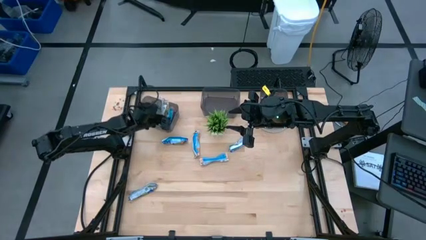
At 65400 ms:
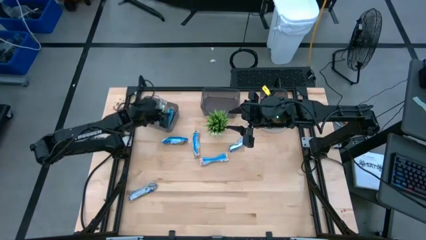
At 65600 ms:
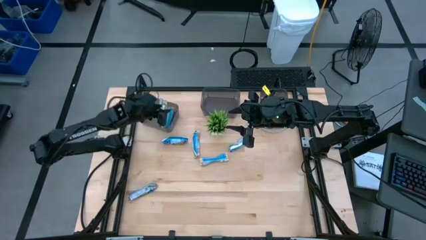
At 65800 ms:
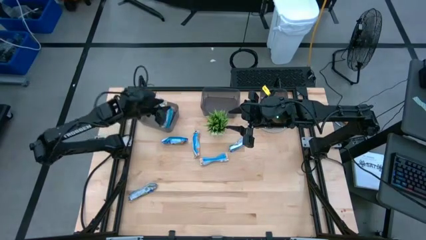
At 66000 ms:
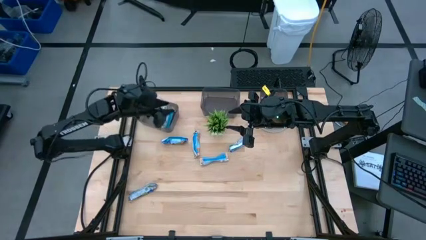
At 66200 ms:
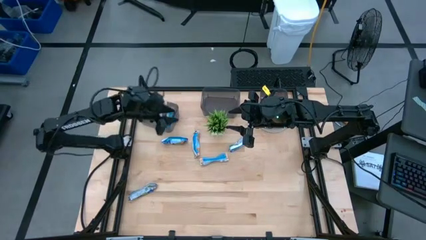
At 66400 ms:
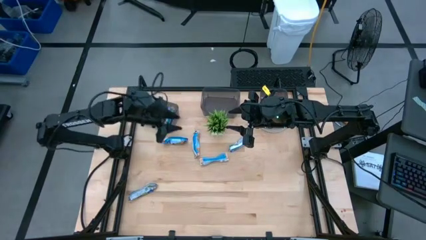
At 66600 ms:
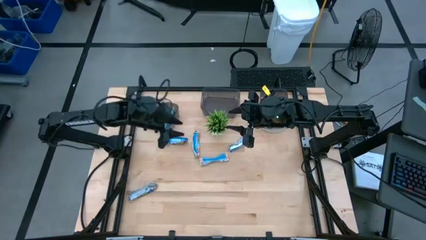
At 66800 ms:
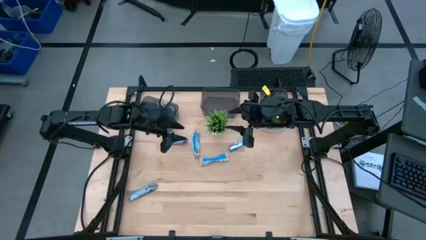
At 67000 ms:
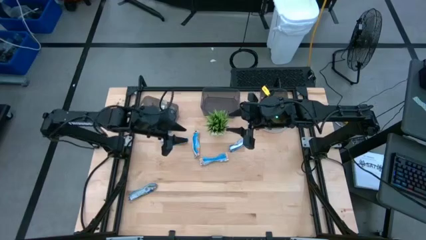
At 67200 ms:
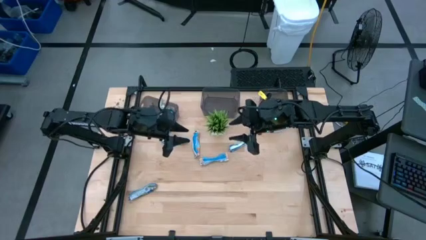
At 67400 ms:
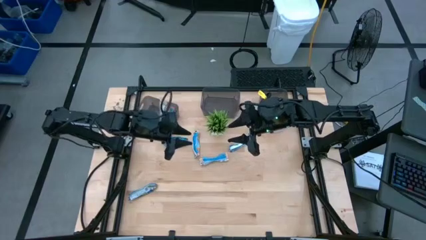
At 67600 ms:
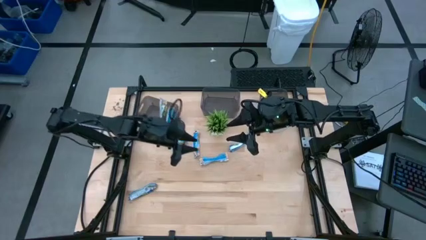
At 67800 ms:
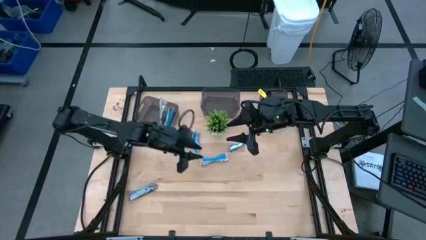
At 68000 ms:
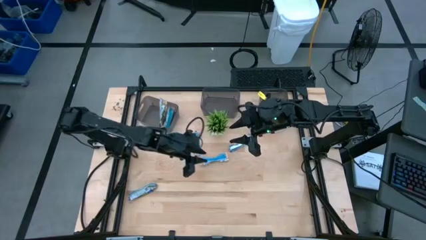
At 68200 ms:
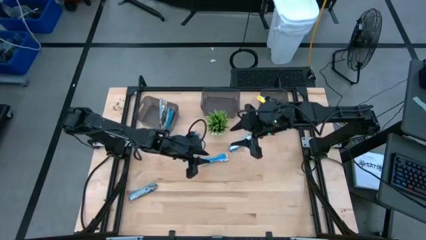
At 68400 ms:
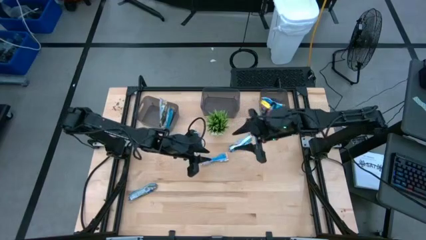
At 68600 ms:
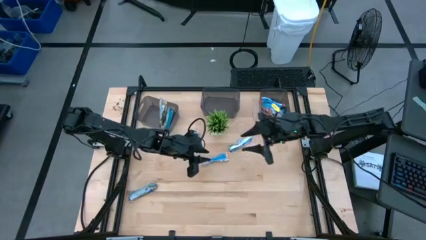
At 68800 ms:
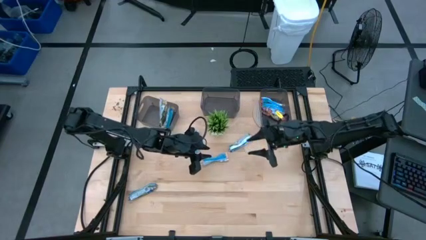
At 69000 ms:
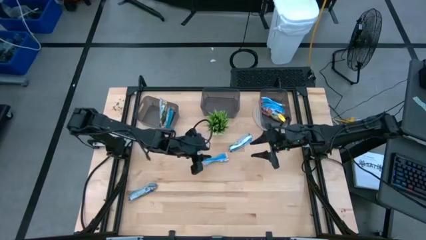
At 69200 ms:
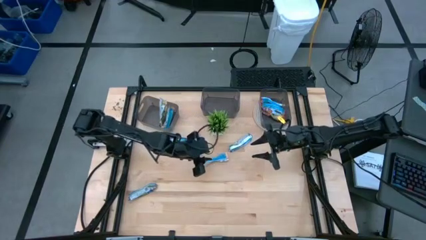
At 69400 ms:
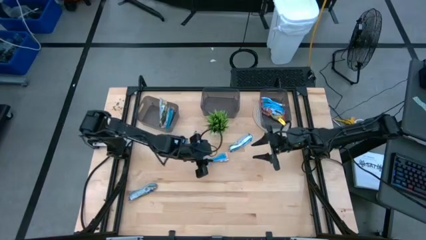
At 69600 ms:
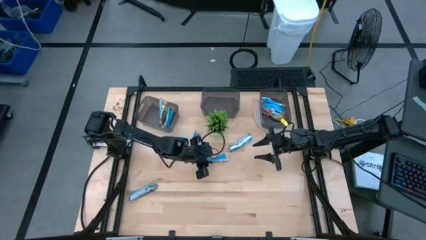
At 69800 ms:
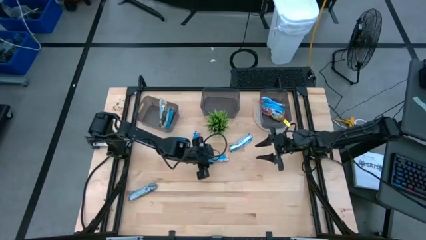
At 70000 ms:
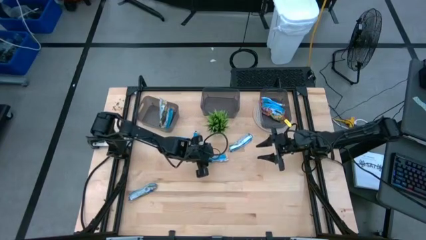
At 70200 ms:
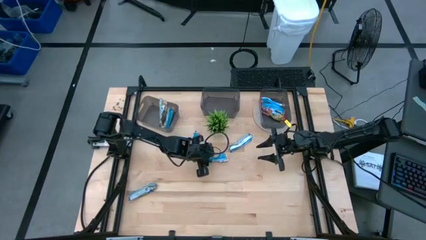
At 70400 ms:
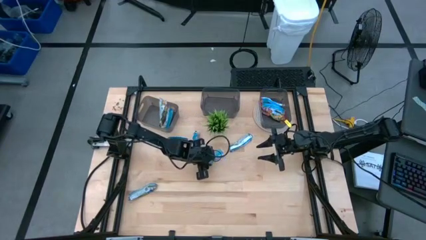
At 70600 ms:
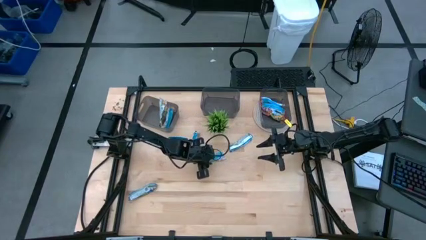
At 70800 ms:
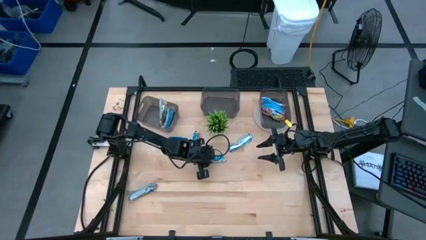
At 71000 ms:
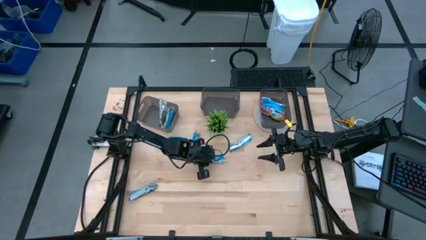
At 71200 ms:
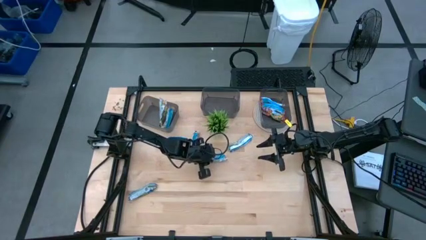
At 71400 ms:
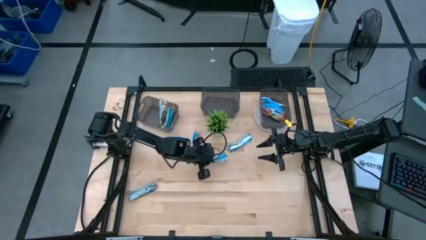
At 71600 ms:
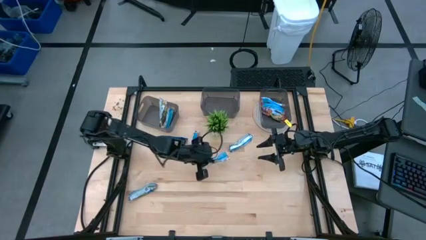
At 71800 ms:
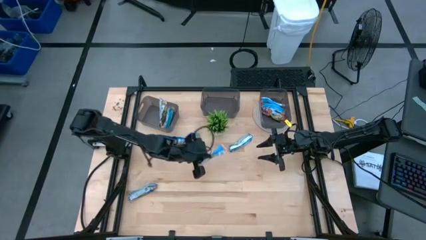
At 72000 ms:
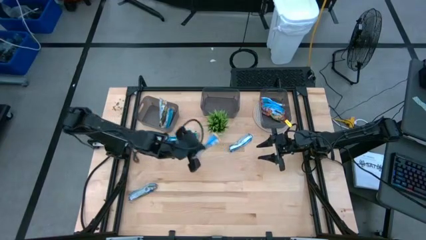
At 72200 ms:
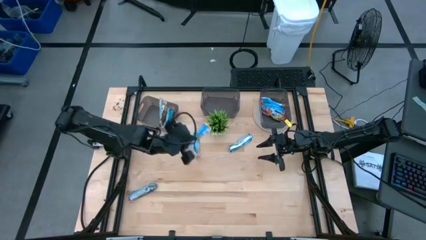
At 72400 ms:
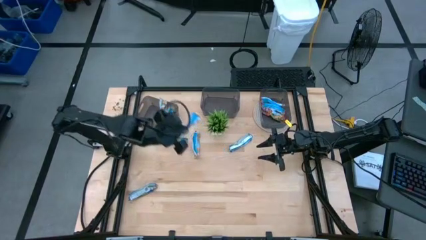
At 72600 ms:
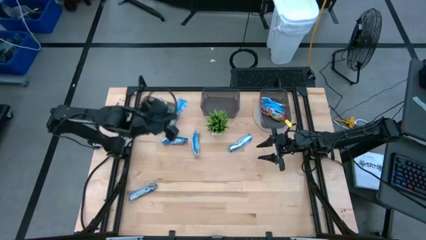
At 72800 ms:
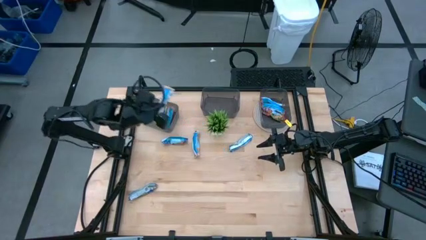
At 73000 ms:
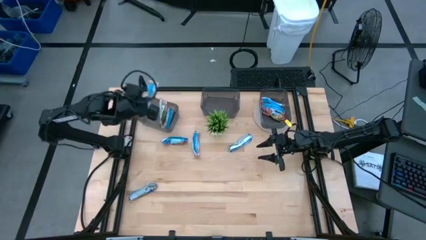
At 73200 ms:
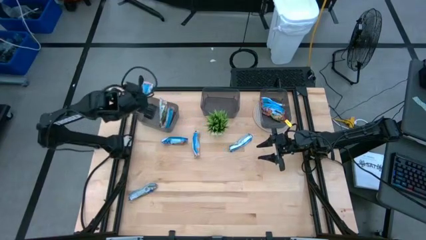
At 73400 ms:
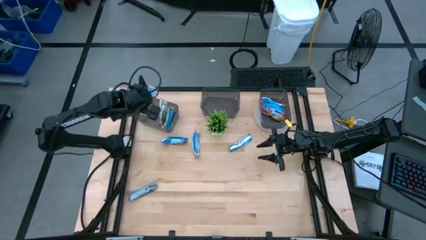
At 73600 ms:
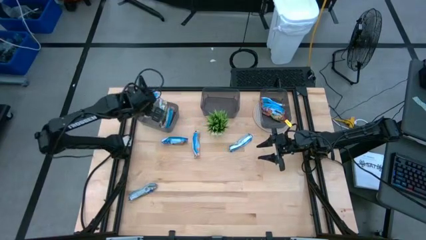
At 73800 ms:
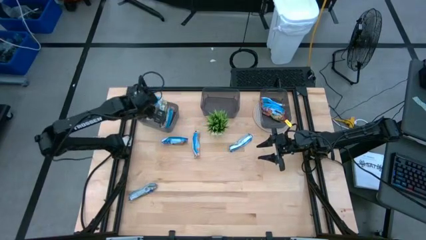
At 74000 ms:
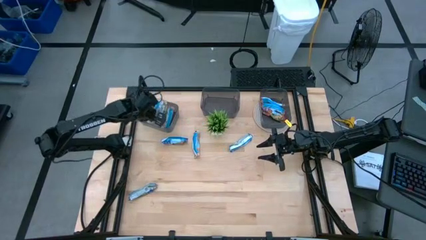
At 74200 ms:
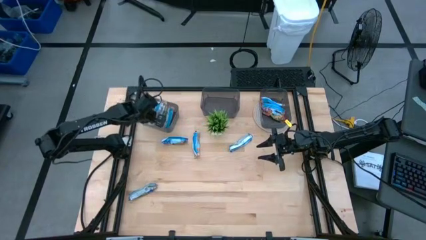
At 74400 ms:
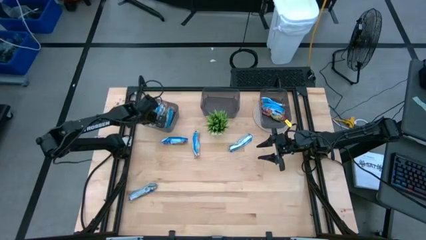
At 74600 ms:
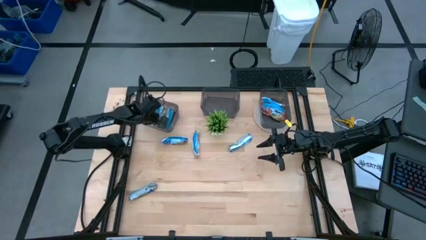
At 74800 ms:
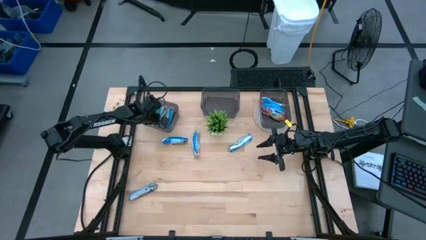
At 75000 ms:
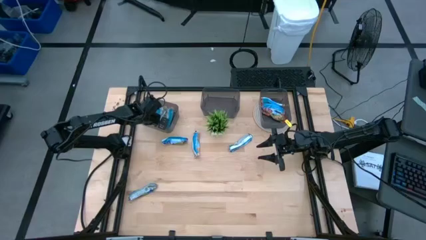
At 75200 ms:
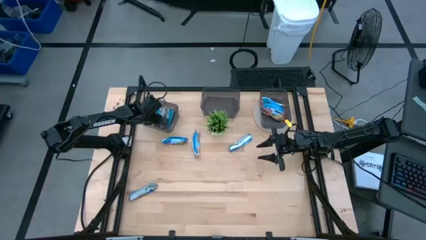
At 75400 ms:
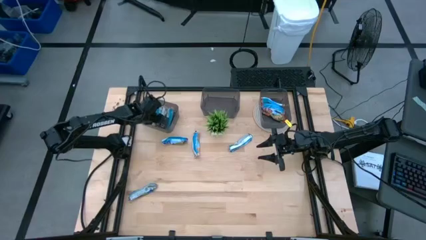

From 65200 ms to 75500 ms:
Task: Pick and place Granola Bars by type
Put the yellow granola bar into the left black bin

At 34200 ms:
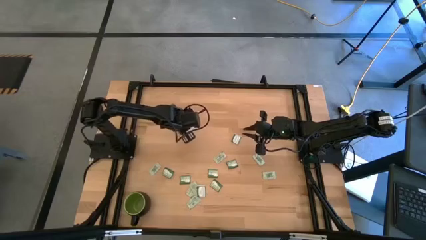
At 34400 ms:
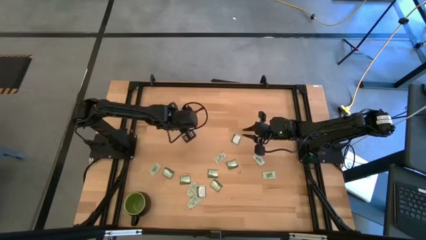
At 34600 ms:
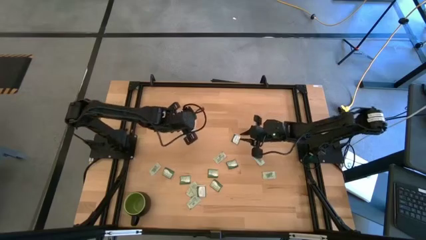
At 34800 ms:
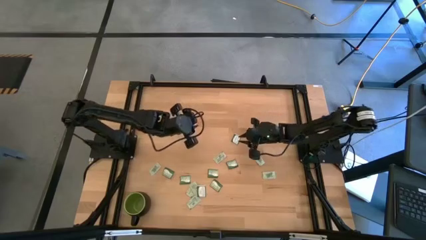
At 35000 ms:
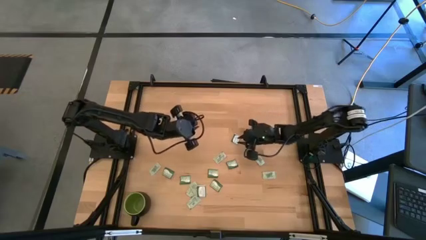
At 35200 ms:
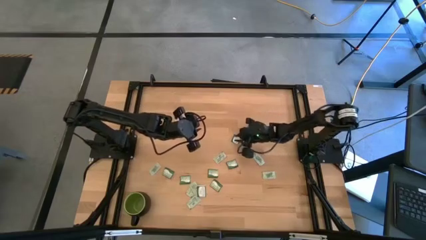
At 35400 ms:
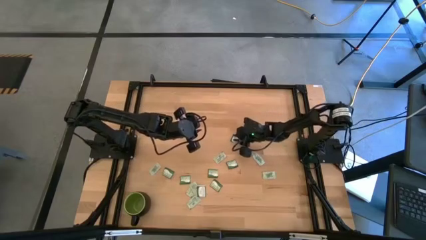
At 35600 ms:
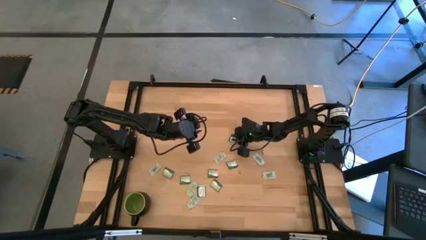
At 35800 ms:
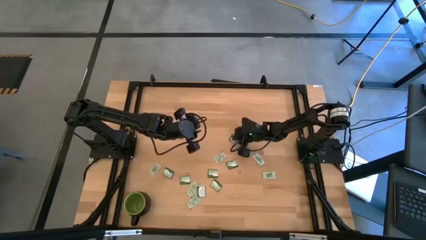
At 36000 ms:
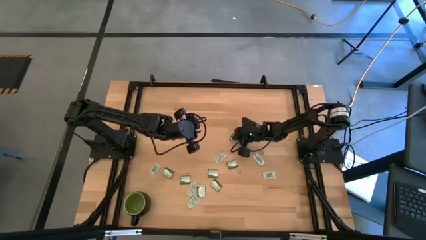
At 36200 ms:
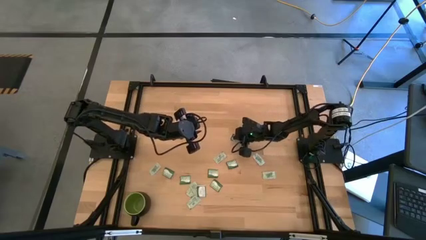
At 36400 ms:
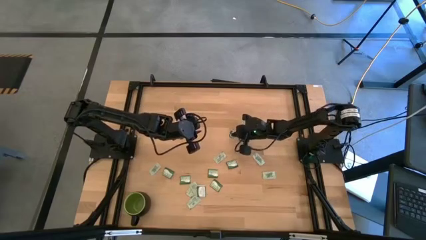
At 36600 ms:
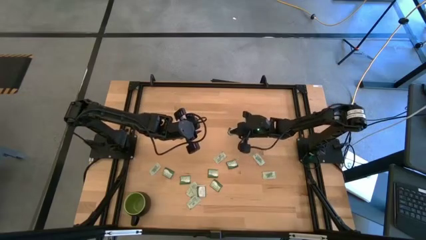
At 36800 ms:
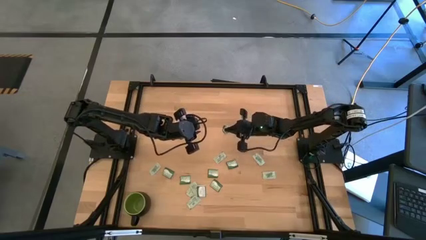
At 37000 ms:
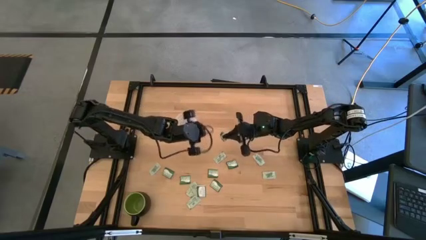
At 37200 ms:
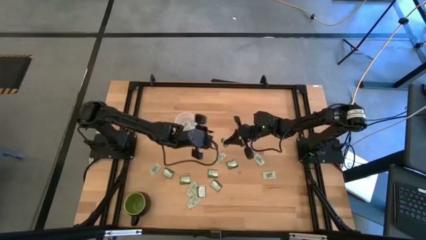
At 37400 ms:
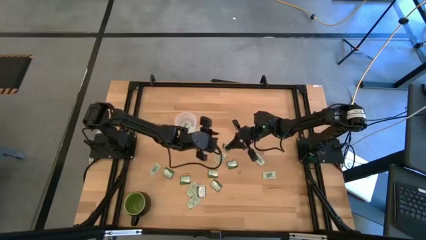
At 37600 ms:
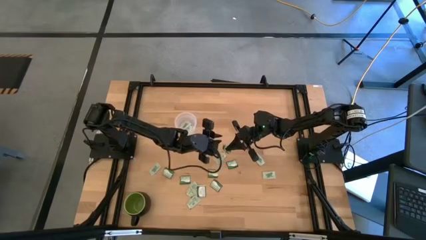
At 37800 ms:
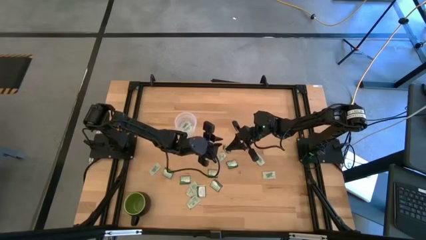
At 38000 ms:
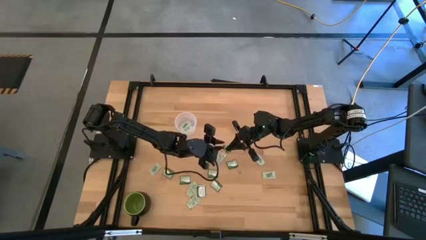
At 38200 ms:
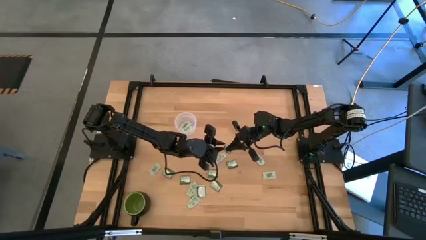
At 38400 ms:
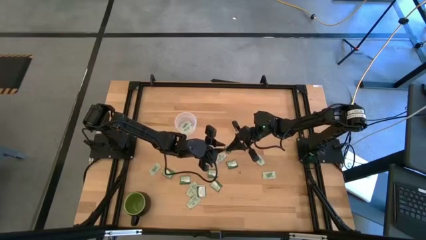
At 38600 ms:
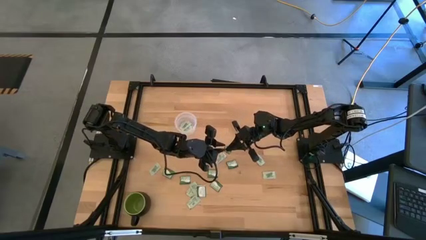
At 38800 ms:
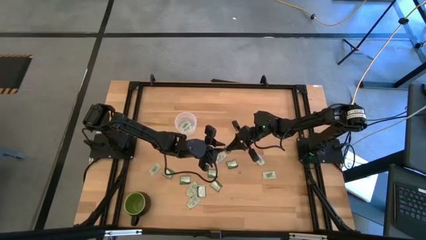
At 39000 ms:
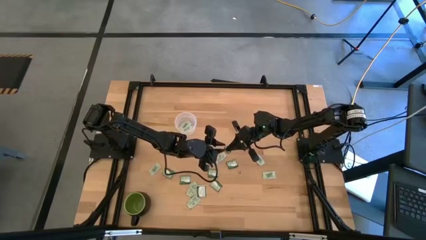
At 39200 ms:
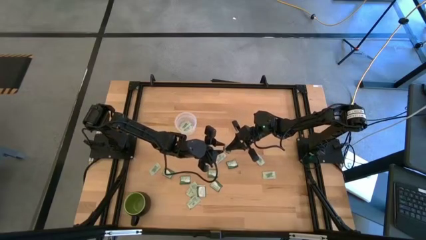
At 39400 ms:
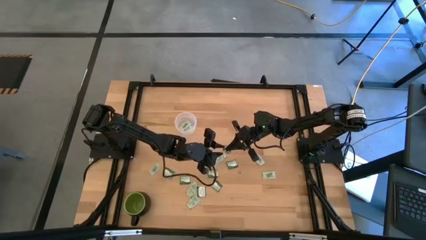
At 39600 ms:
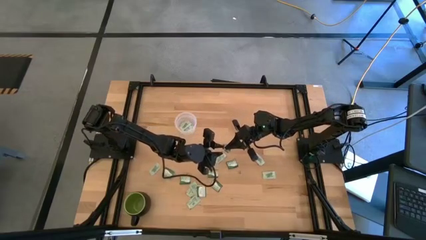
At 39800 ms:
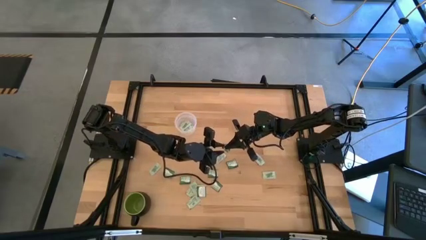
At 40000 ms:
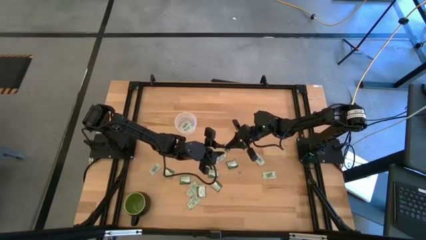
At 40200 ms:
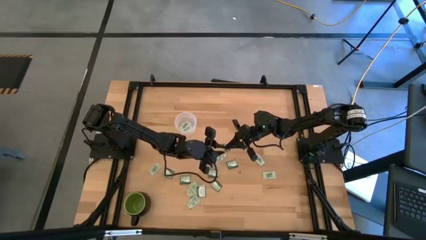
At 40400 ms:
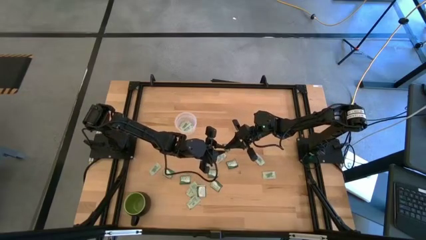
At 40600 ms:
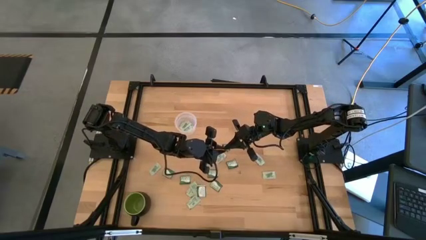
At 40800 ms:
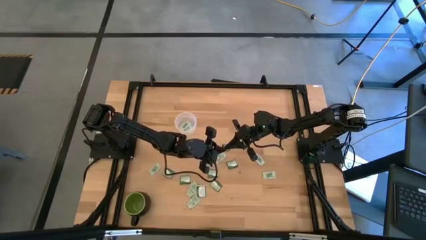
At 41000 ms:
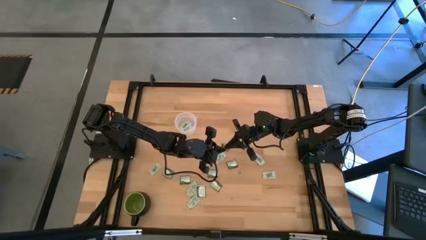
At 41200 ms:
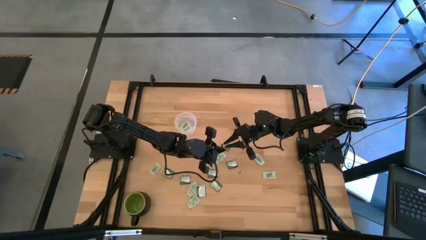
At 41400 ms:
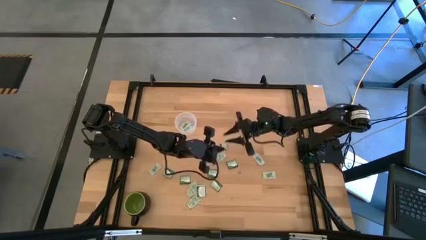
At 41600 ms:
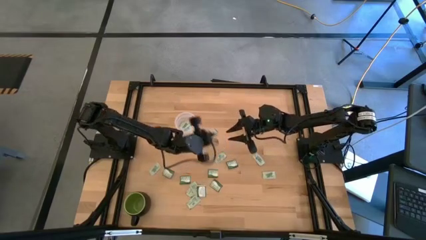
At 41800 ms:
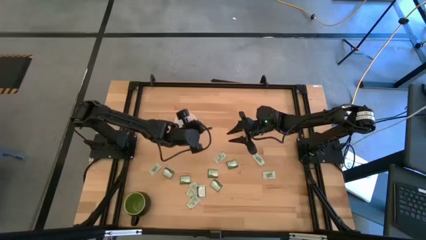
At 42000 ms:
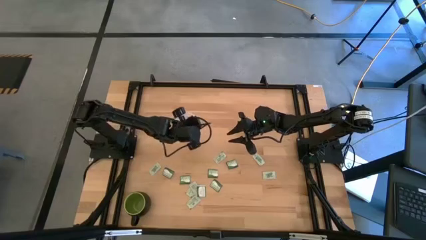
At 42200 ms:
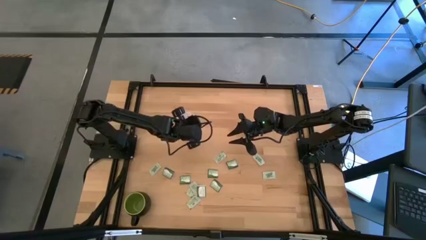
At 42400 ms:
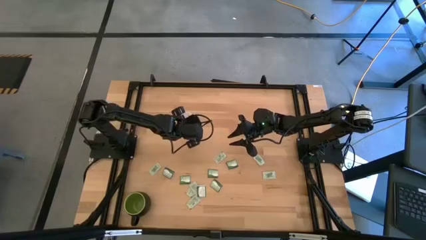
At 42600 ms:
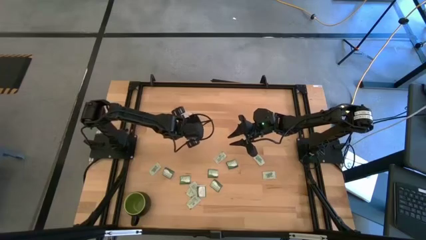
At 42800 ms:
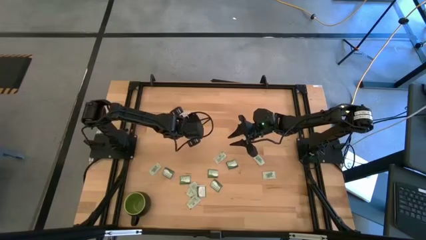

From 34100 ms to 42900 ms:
Task: Pick and place Stevia / Truvia into bins
Put the green stevia packet into the transparent container
